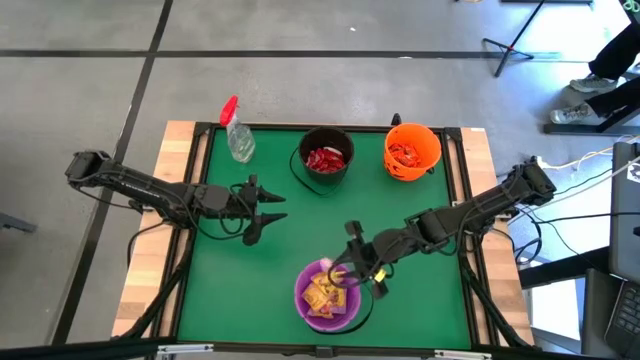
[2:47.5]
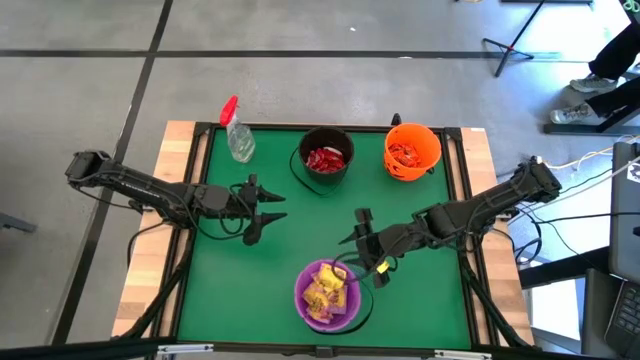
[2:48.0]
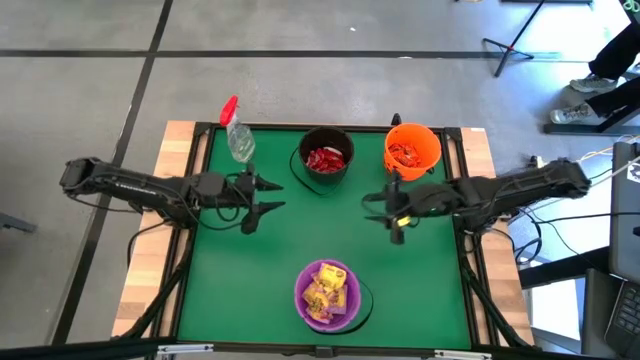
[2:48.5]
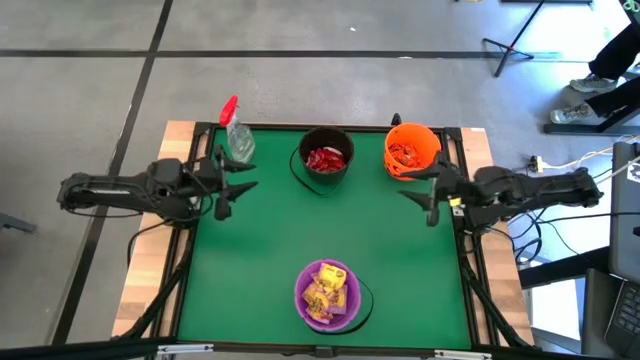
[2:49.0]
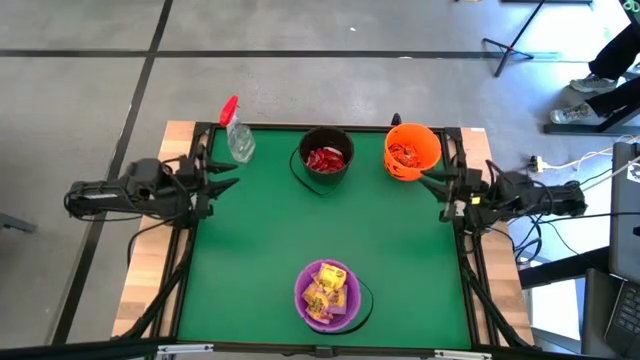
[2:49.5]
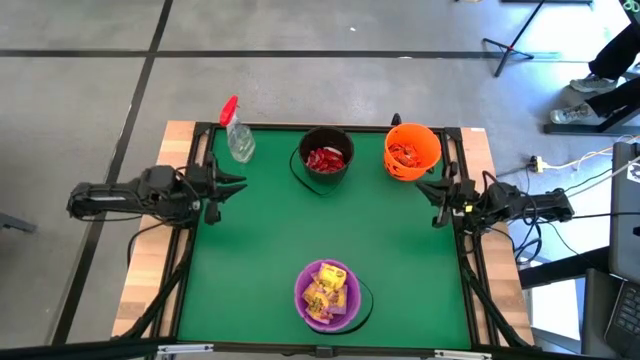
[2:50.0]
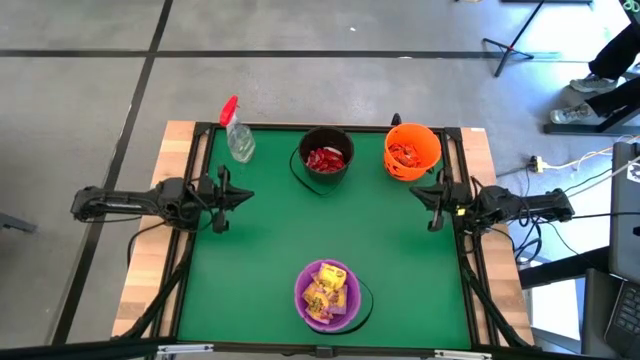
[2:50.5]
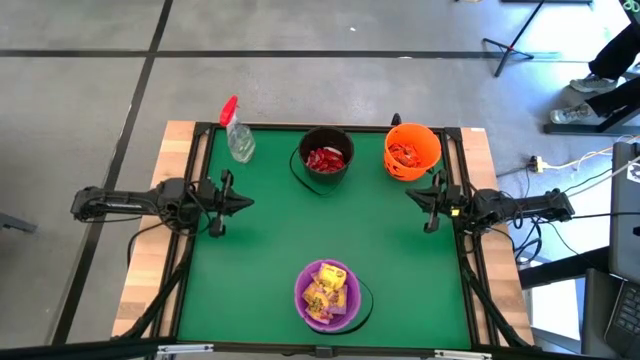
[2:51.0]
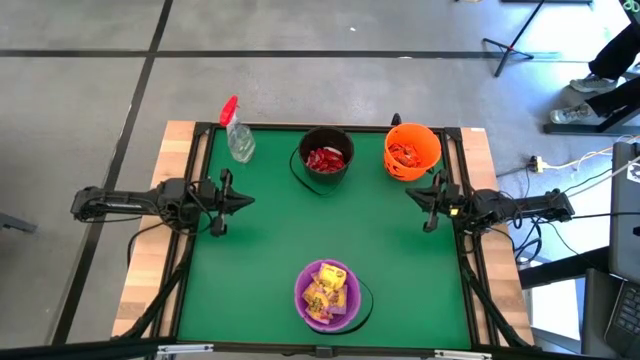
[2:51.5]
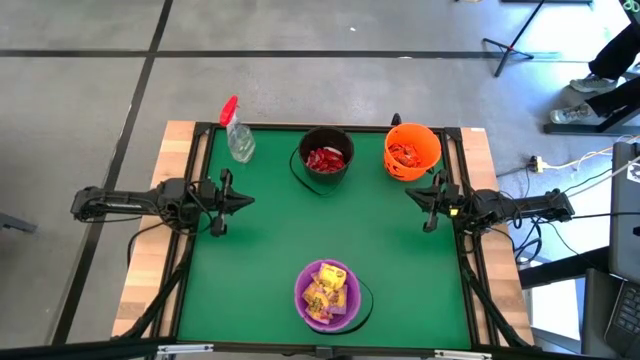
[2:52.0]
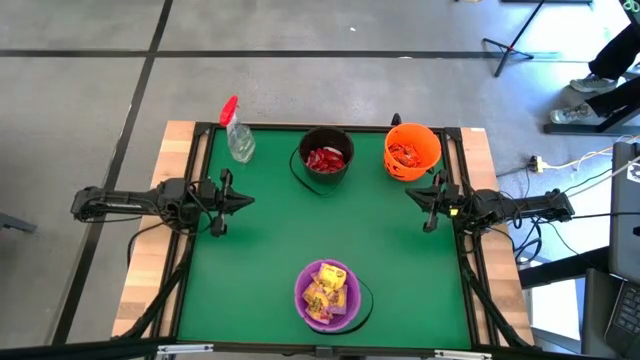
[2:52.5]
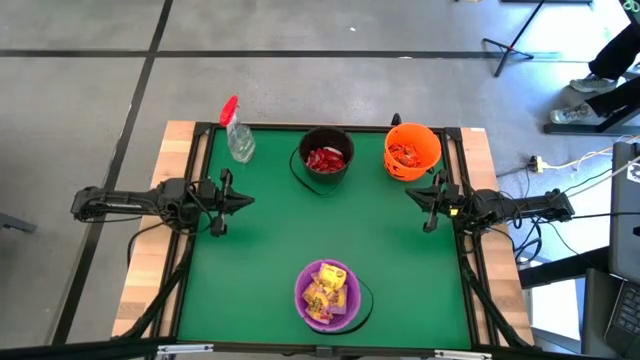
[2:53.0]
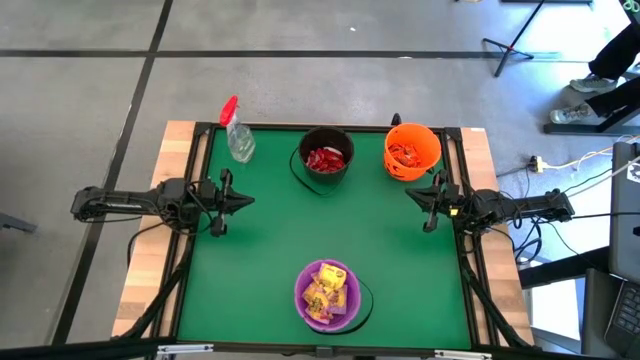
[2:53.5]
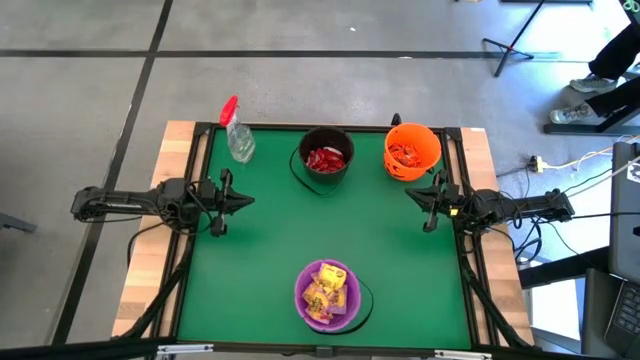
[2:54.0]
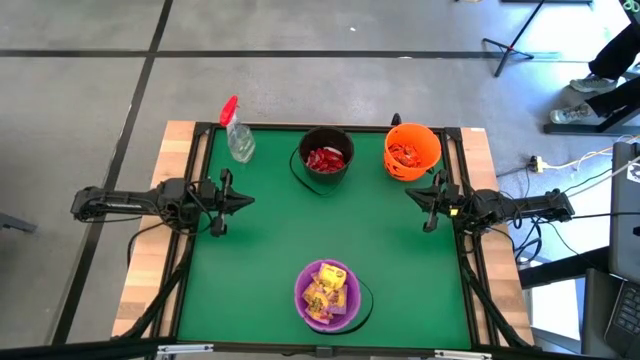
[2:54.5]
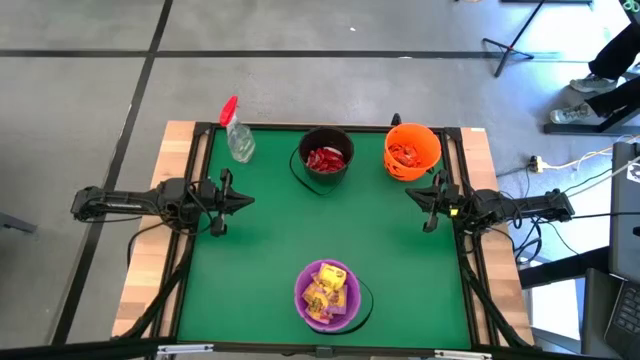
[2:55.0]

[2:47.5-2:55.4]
Task: Organize candy in baskets
Return to Home position

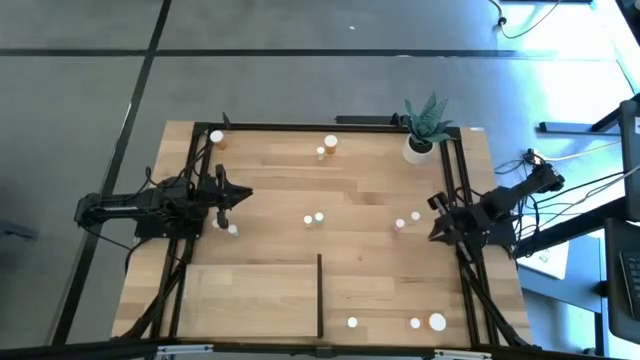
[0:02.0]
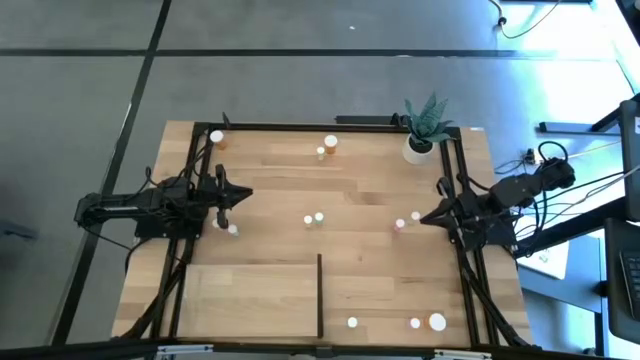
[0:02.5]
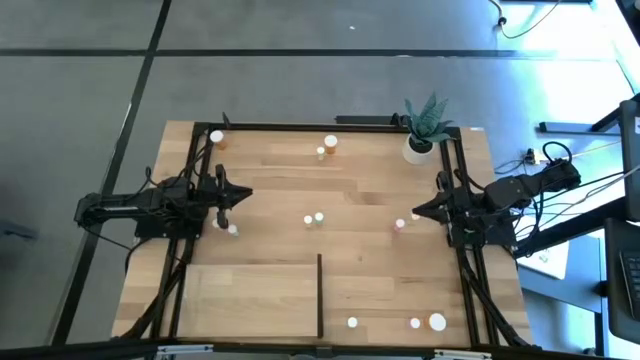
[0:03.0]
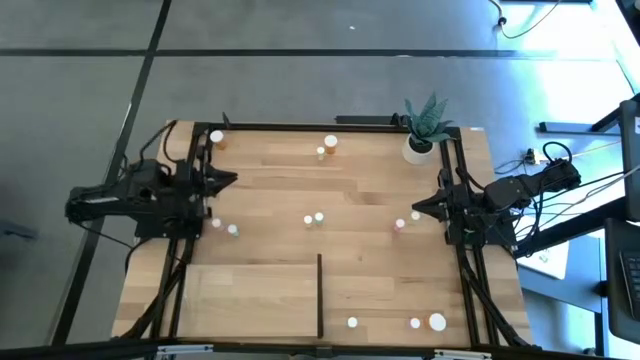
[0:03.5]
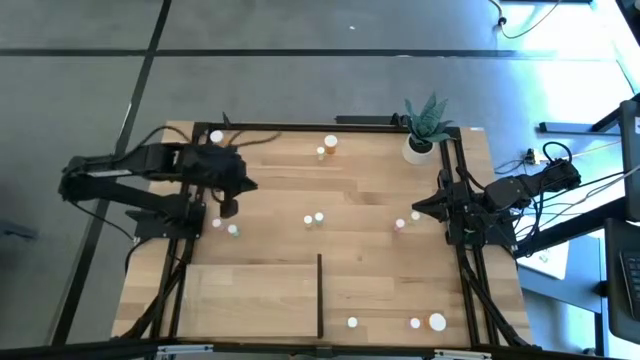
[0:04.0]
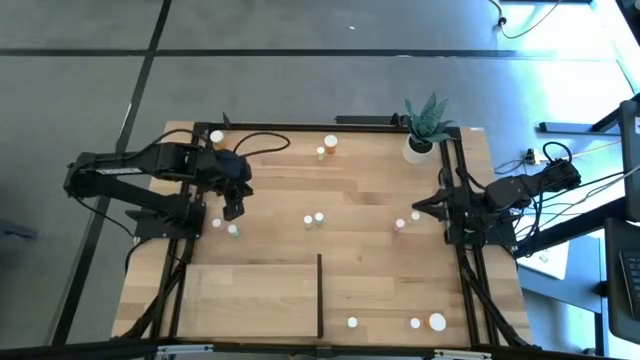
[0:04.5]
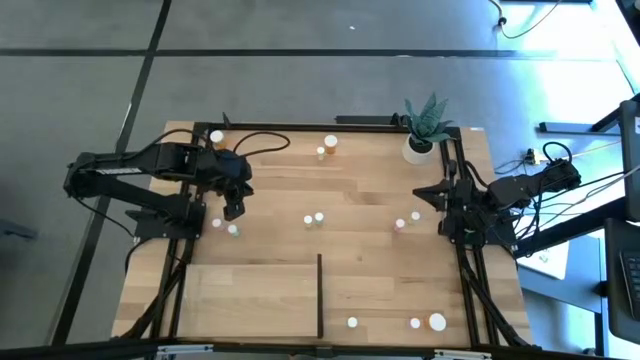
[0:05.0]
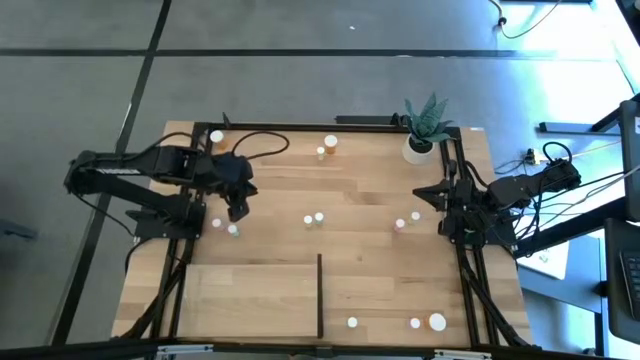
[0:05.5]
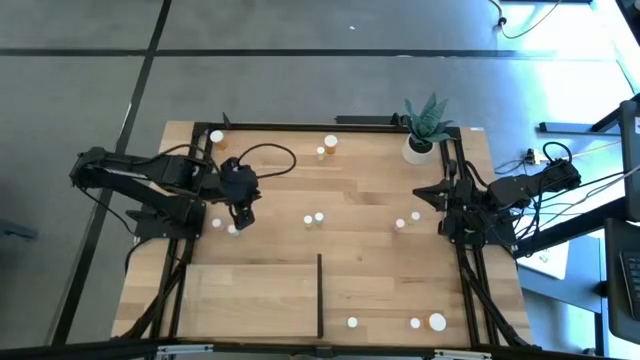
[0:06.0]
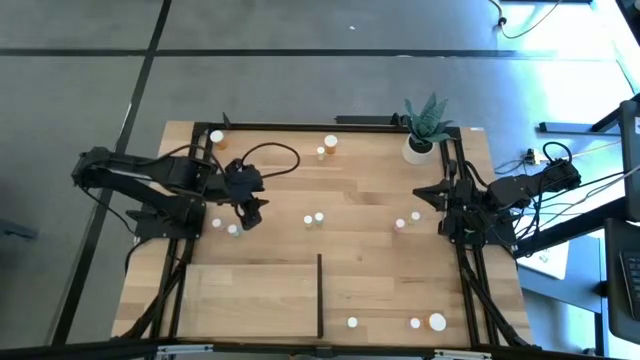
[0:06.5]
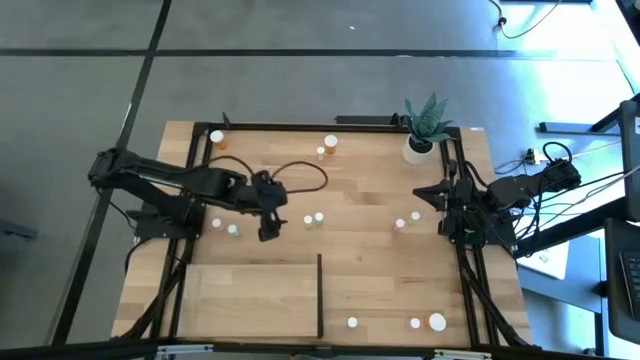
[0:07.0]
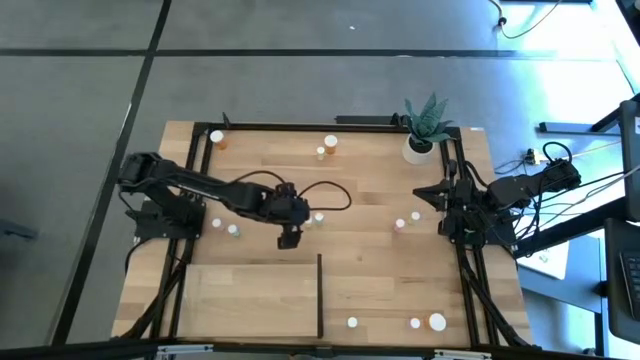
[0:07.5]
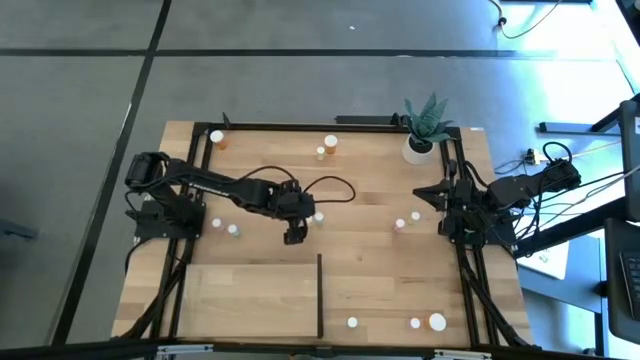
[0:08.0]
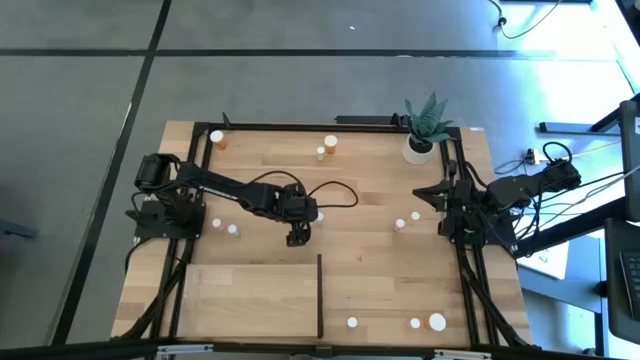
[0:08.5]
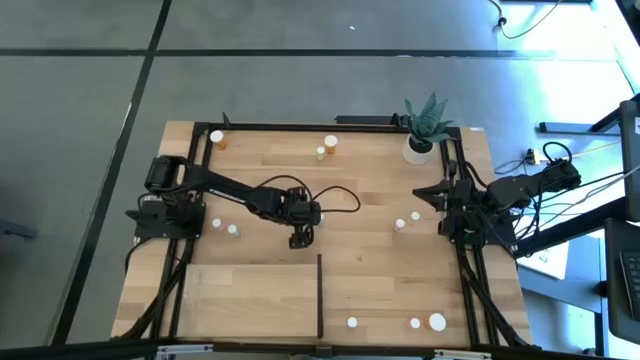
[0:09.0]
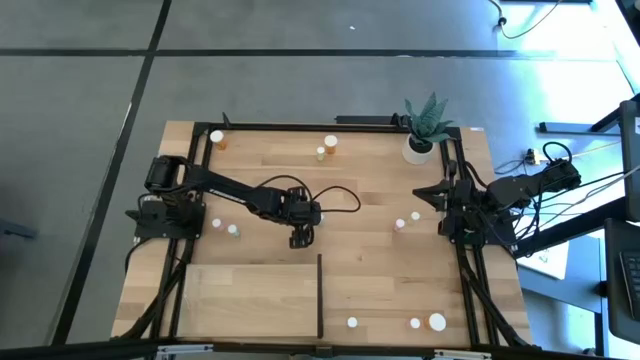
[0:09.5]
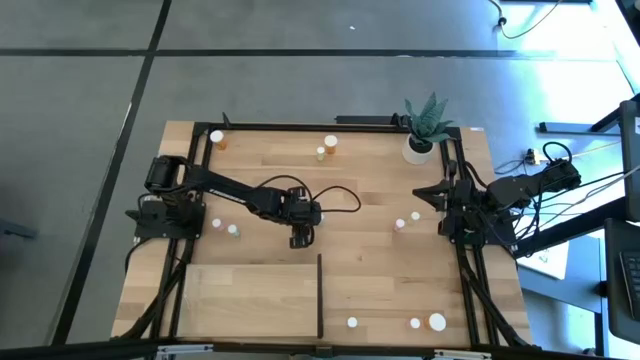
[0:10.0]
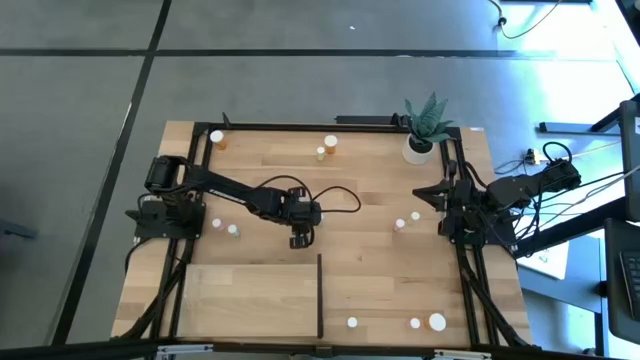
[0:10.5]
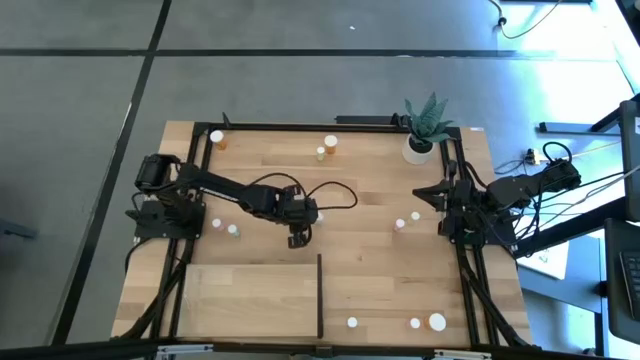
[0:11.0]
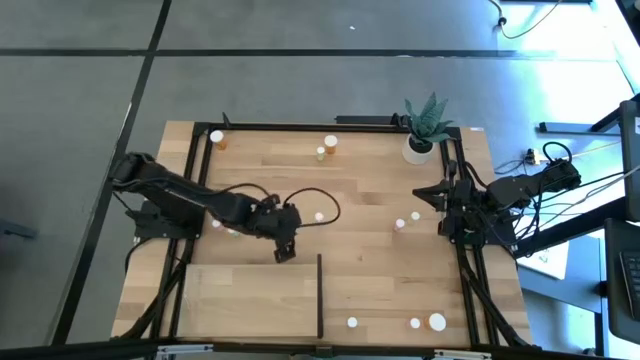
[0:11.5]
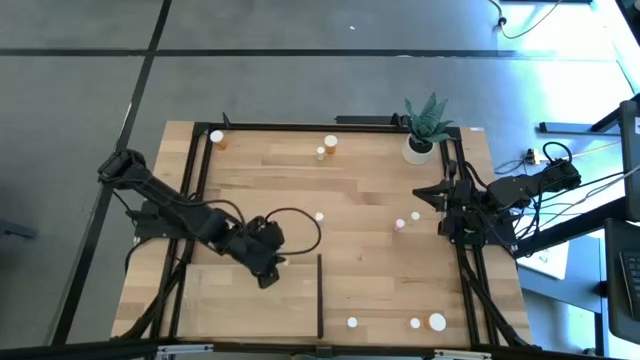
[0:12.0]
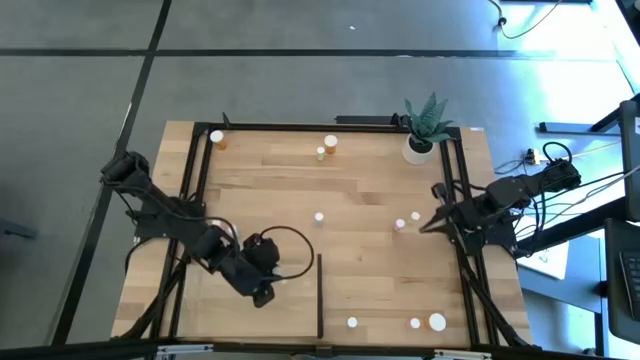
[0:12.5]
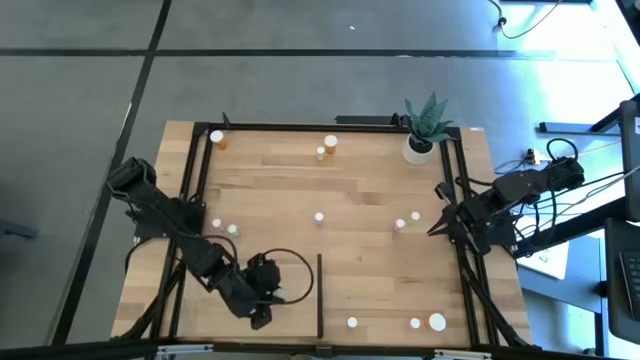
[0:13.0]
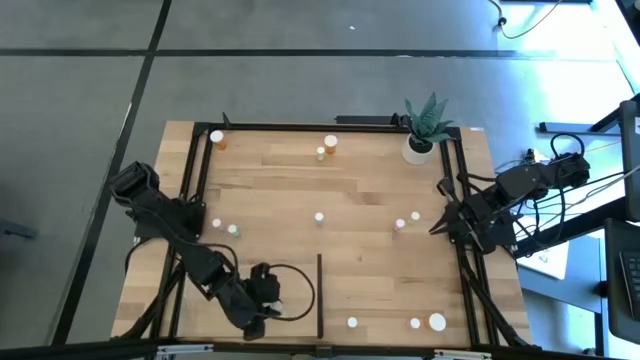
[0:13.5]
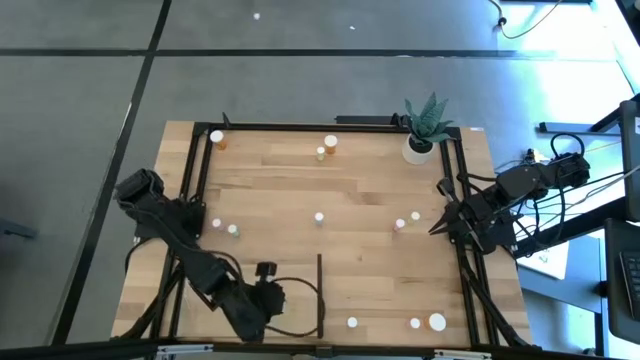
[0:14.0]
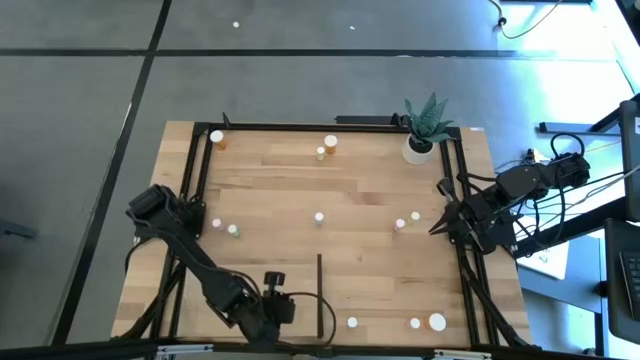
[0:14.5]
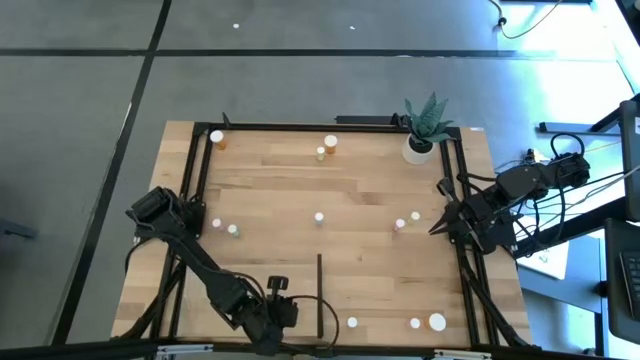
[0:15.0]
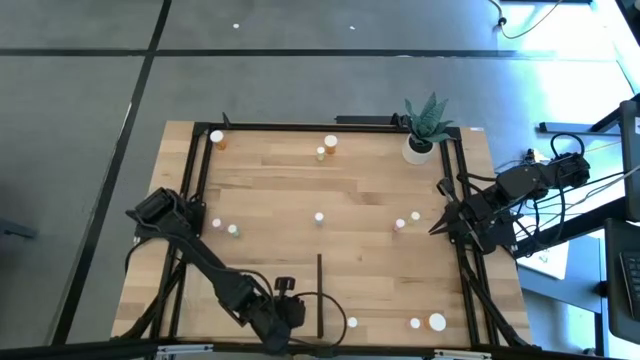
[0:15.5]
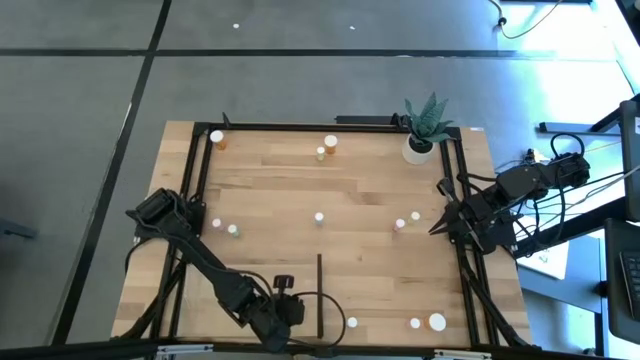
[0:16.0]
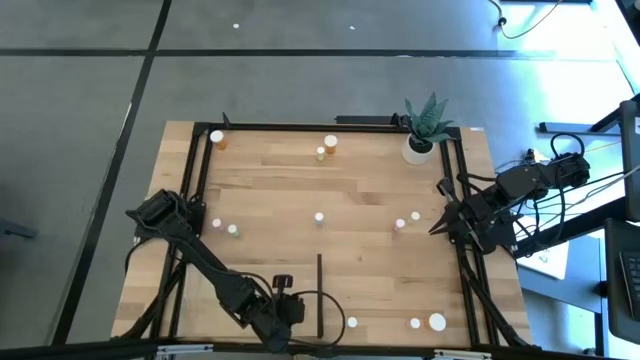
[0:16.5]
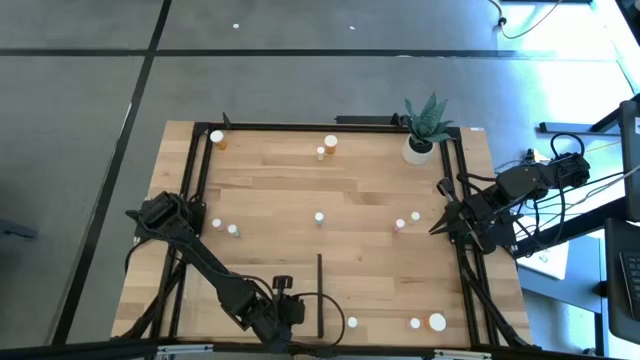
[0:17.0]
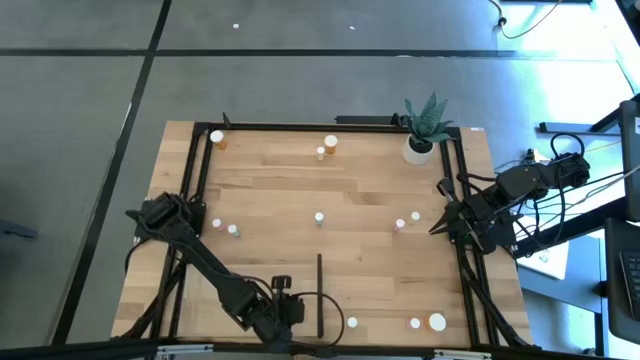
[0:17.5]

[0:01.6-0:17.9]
Task: Pick and place medicine bottles onto shelf by color
Put the center yellow pill bottle on the shelf
